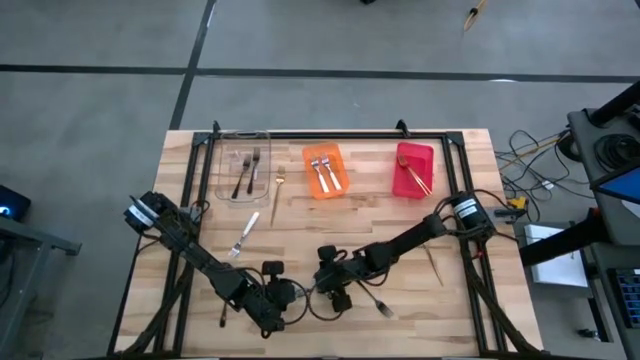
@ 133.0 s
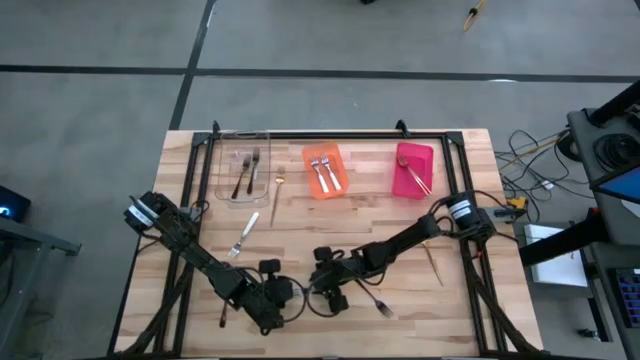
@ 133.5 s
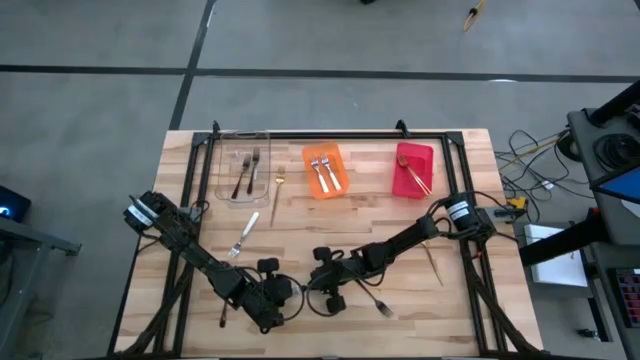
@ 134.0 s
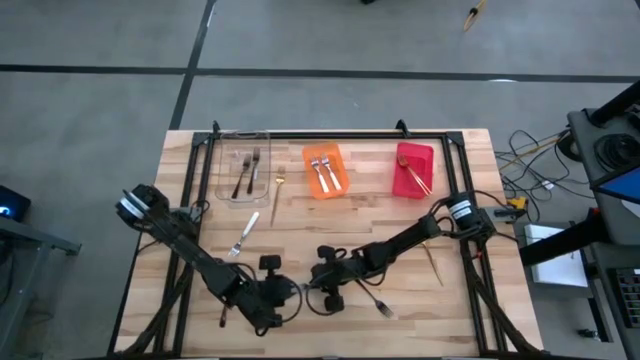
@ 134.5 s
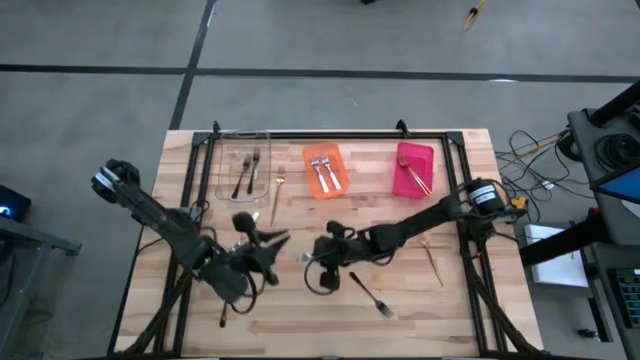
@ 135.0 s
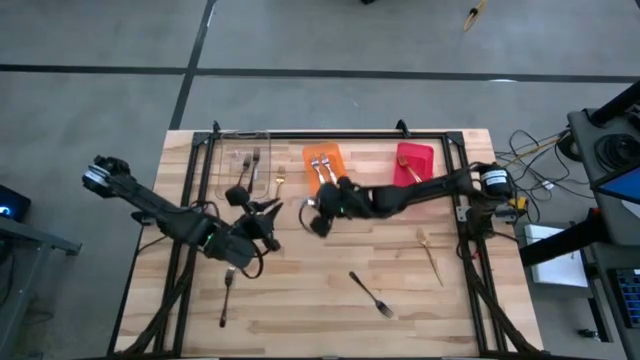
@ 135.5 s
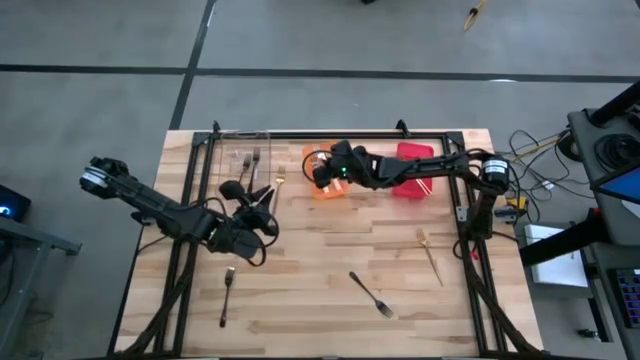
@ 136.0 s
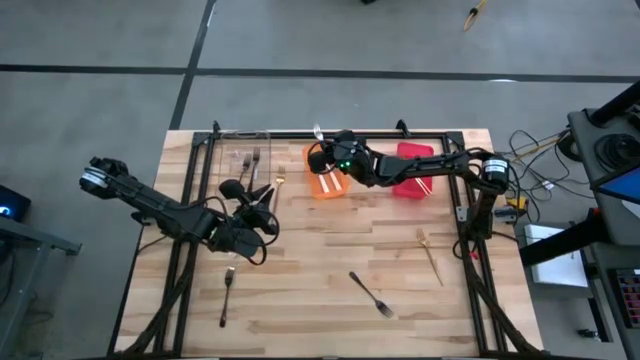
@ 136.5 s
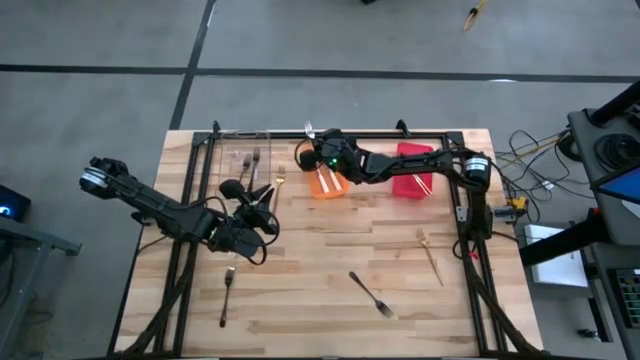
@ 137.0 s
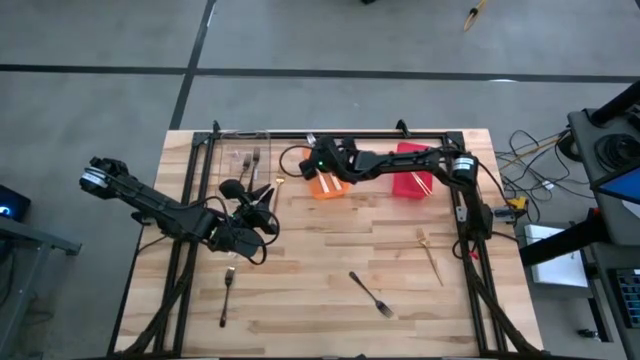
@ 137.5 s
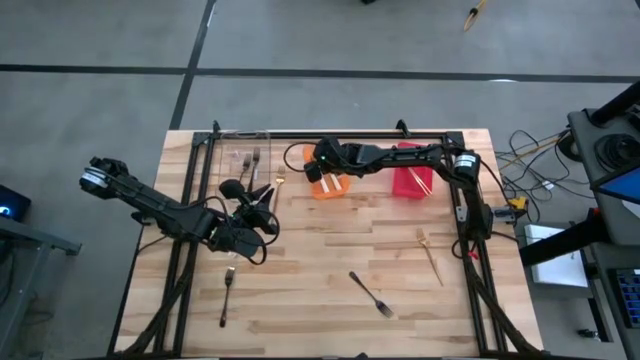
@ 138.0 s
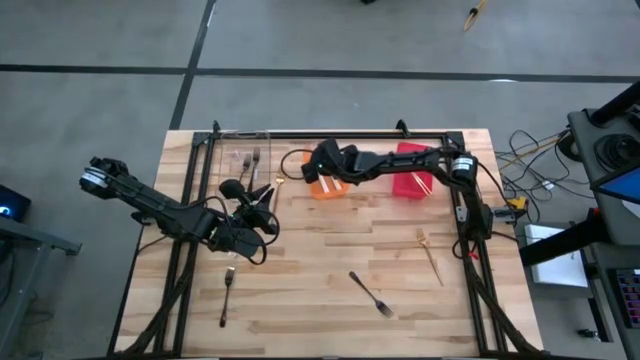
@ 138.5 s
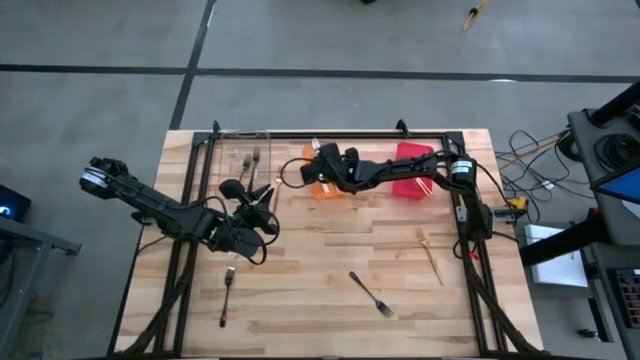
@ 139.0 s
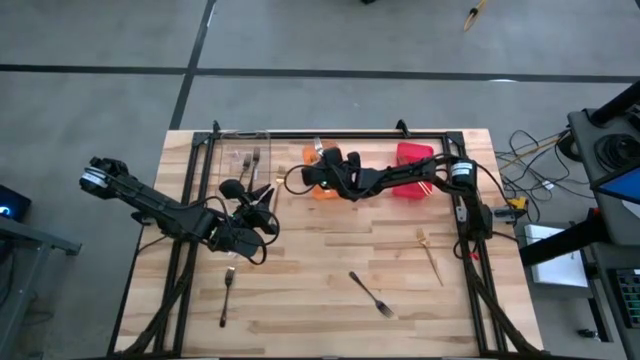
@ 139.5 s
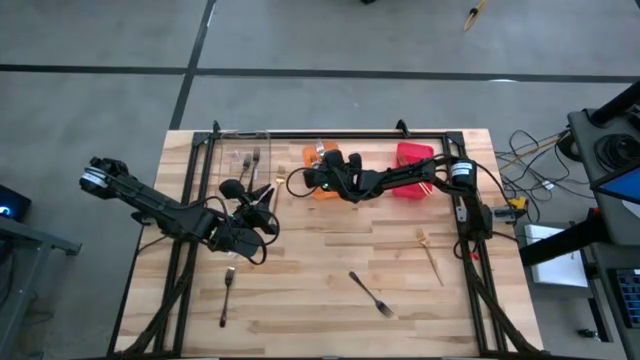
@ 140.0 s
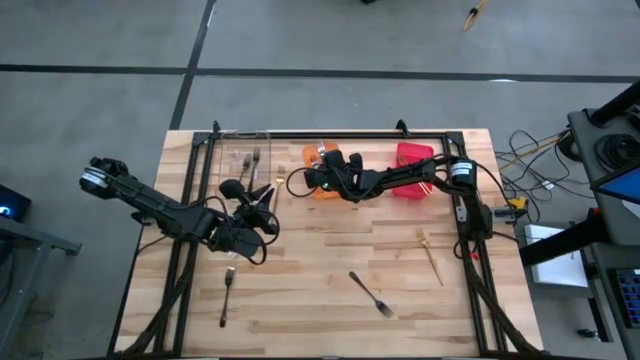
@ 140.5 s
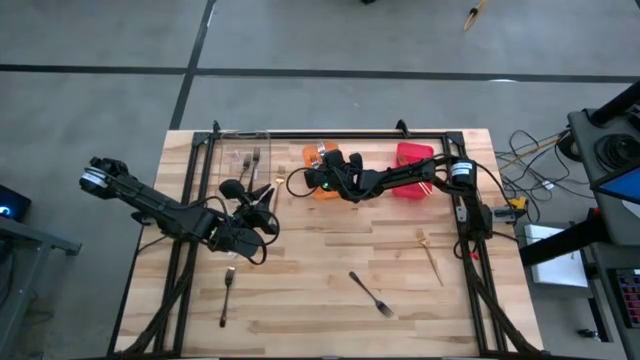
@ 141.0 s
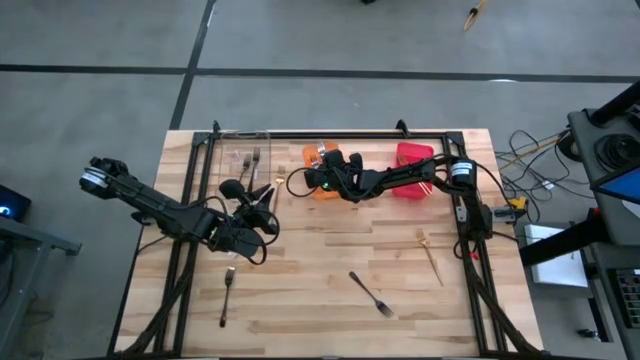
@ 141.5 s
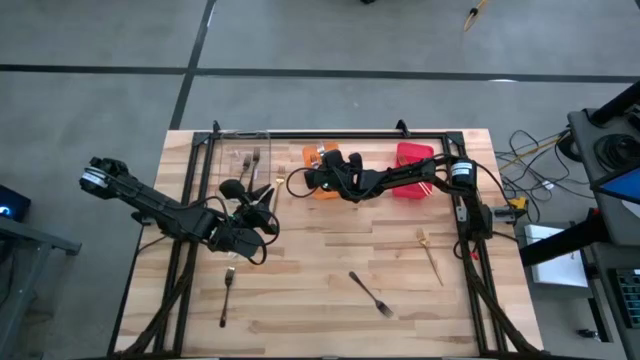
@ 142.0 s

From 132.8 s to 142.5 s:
Task: Sort silverware by color (type)
Put the bottom white fork into the orange bin

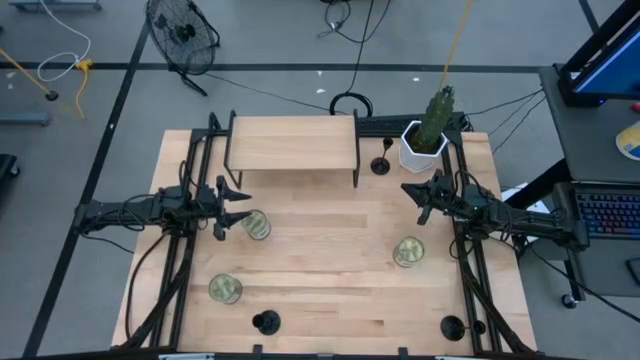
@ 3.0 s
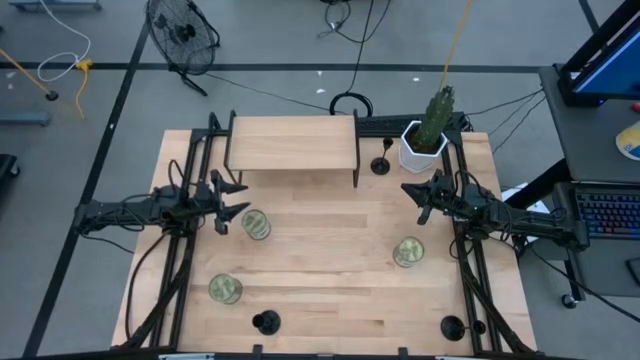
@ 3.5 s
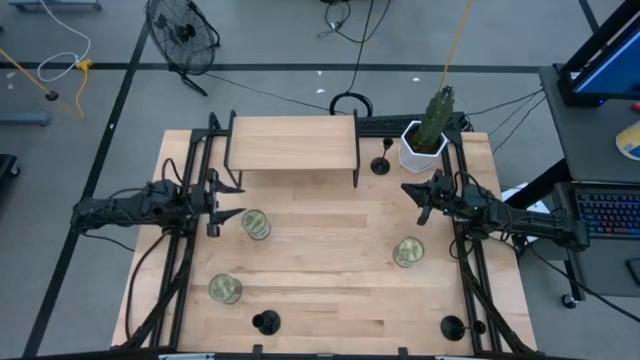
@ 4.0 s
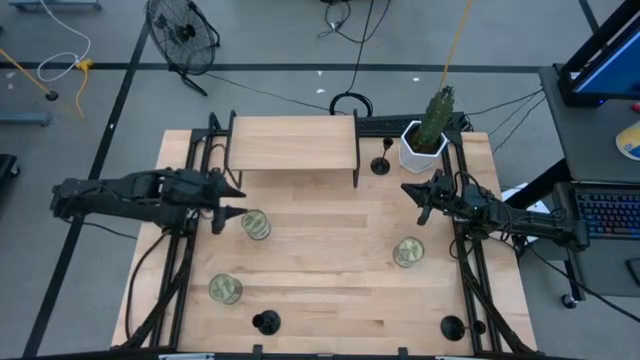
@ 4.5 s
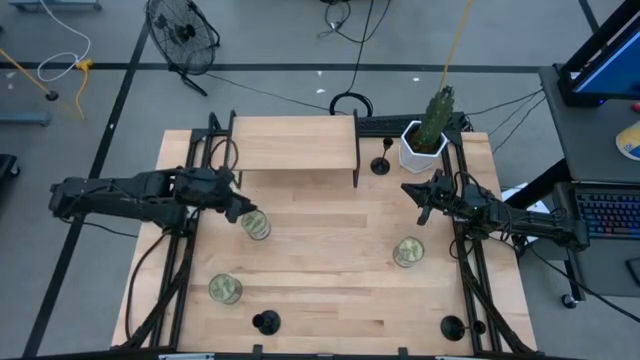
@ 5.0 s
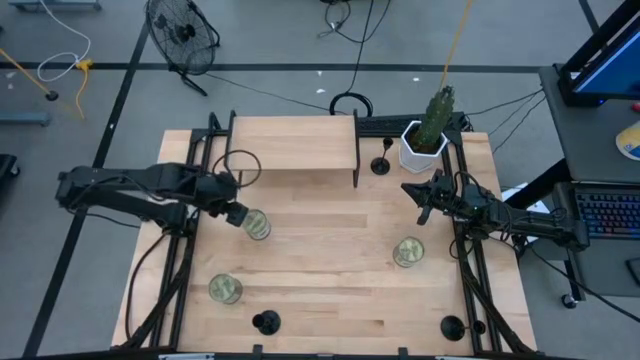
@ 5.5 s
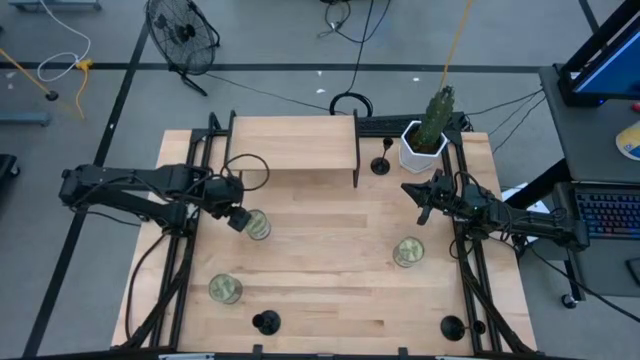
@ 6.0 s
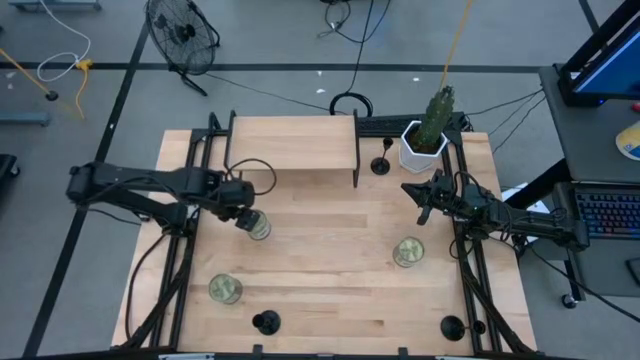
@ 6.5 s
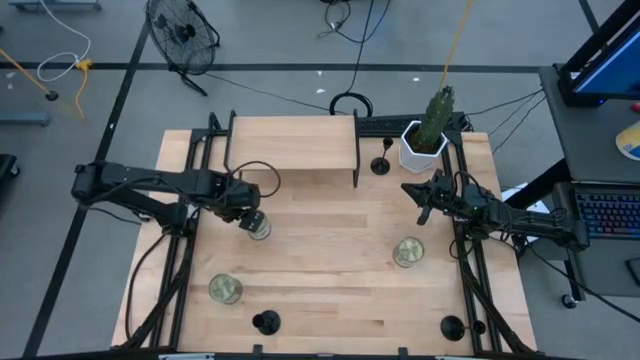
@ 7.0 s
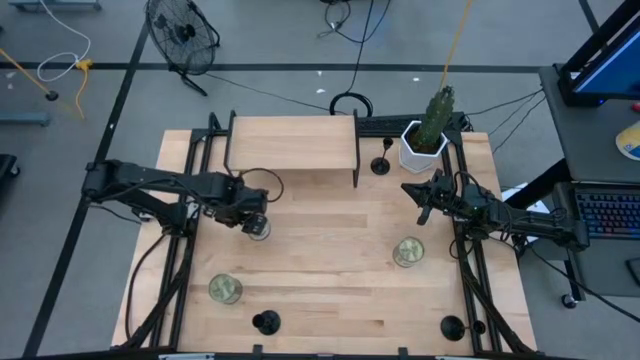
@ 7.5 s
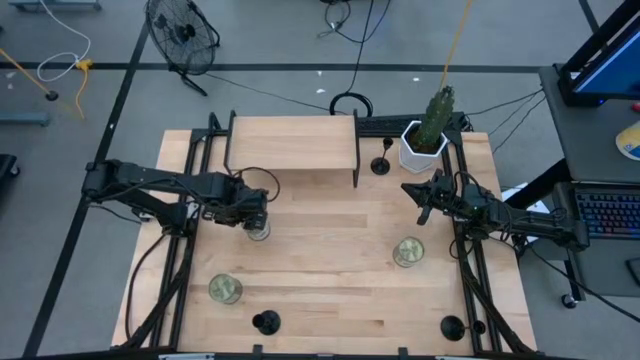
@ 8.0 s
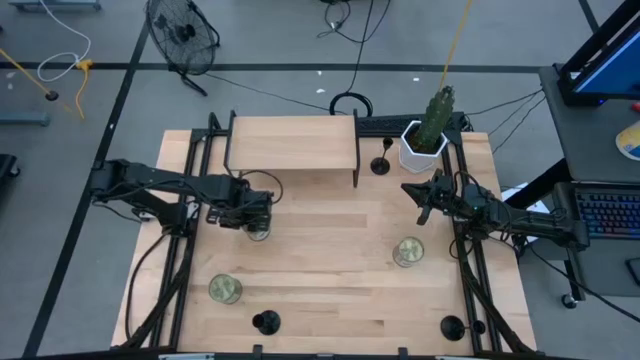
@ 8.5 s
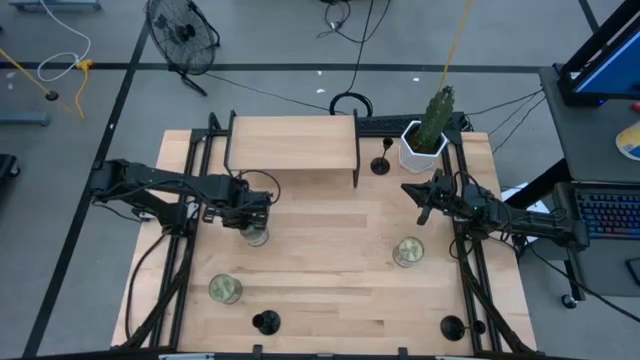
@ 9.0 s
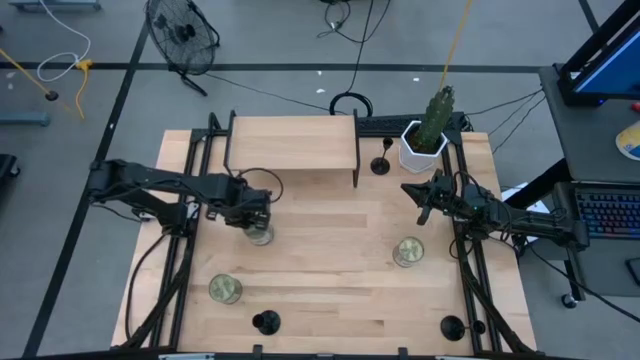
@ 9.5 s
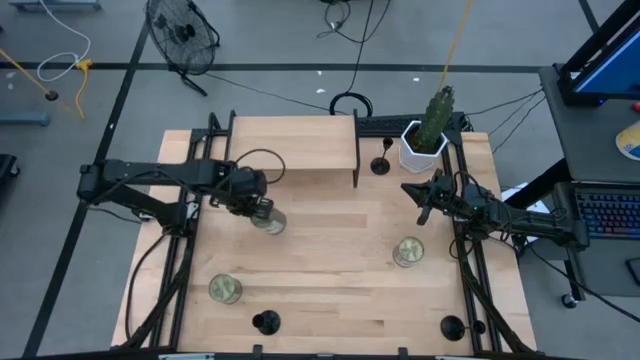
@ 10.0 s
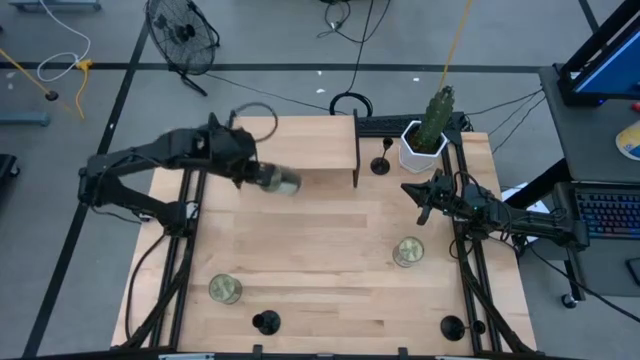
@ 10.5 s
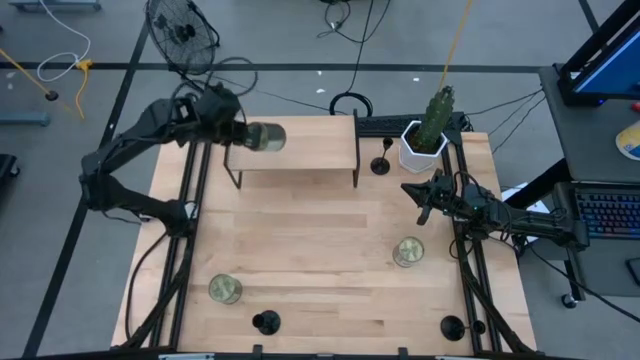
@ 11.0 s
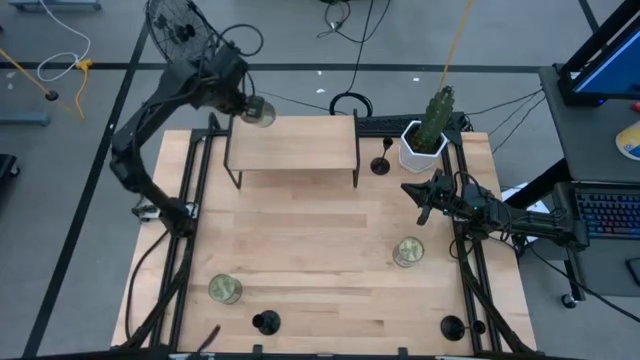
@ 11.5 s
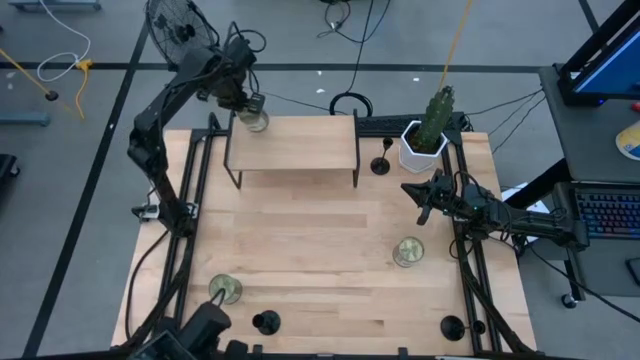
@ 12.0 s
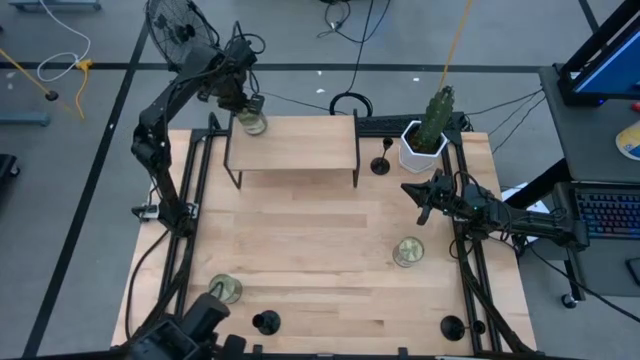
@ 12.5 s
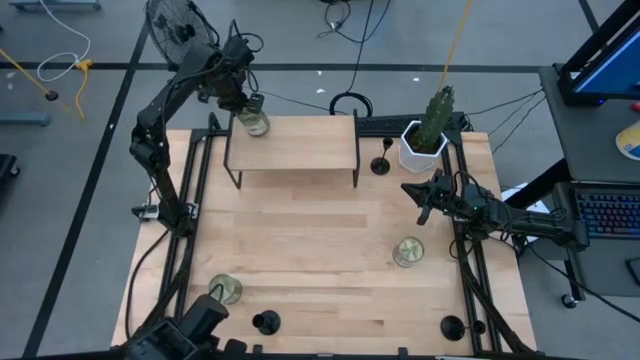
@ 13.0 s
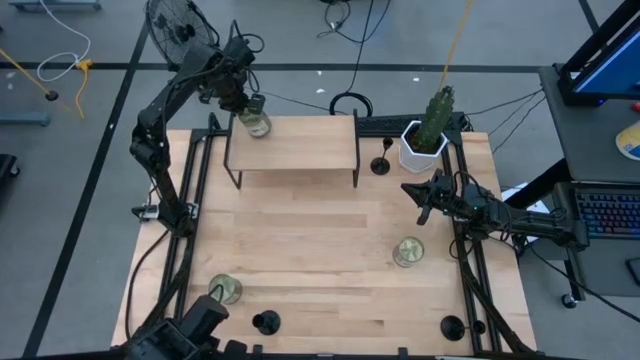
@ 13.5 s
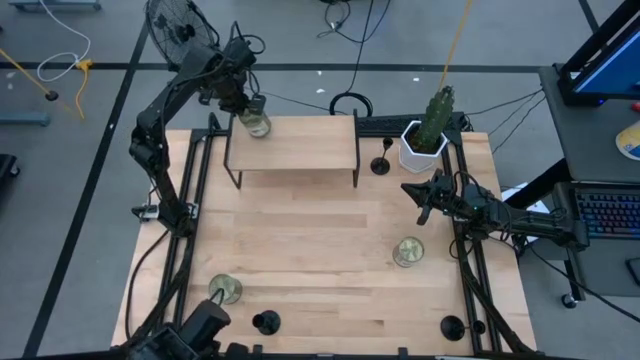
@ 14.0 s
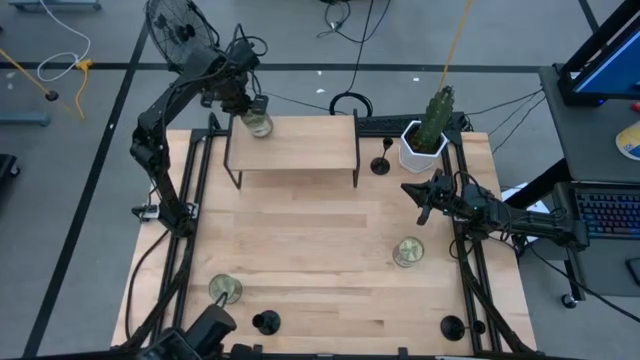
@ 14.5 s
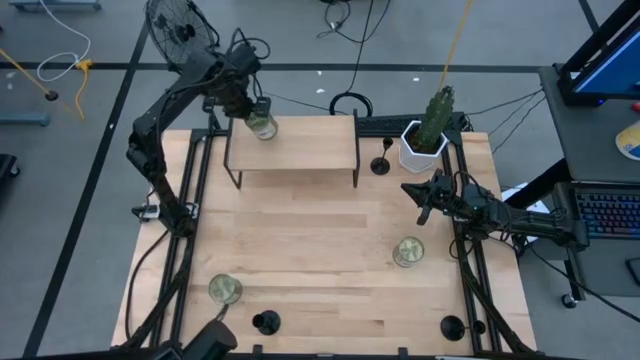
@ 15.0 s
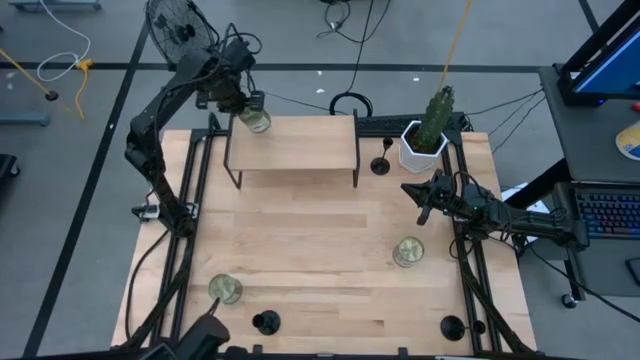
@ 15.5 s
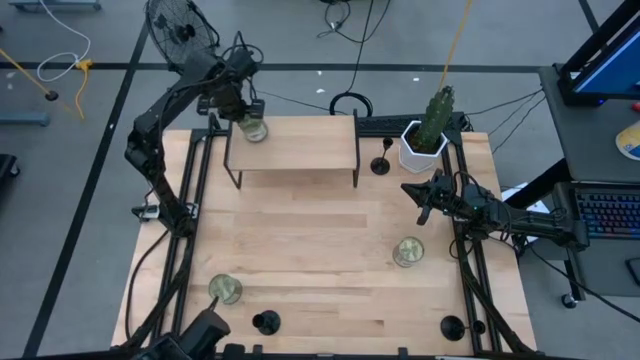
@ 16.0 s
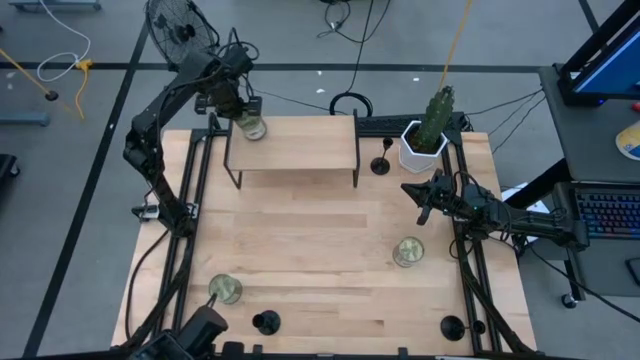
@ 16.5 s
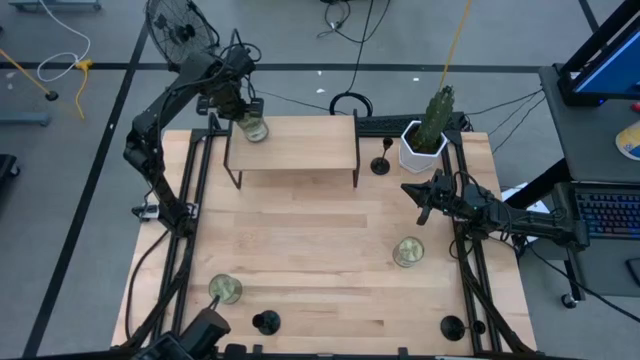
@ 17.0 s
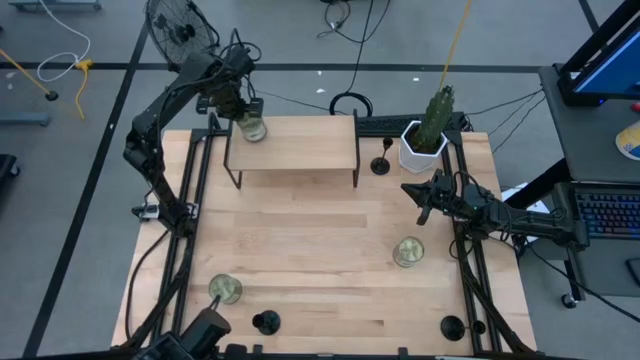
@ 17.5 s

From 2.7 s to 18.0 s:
Task: Pick & Place candle stick holders
Put the top green scented candle on the shelf
